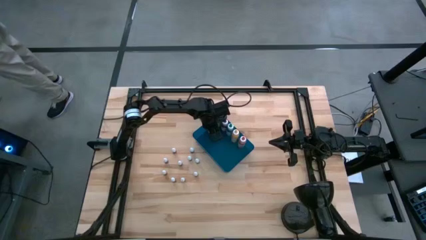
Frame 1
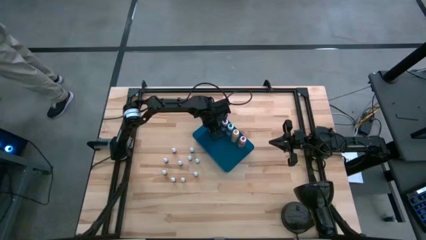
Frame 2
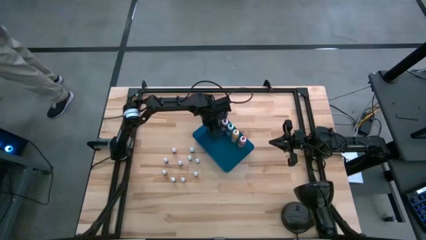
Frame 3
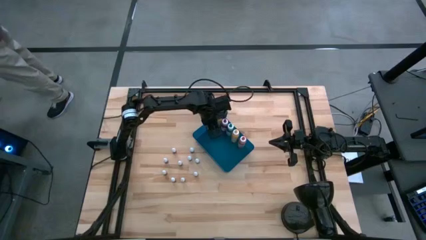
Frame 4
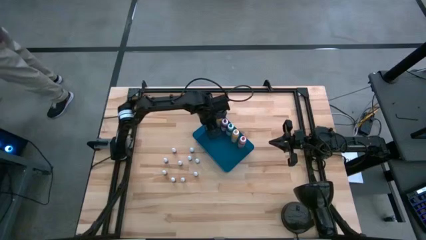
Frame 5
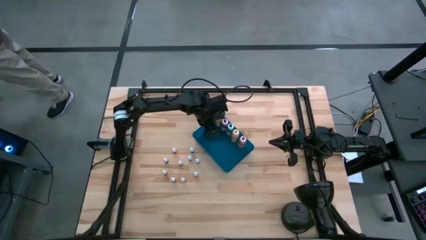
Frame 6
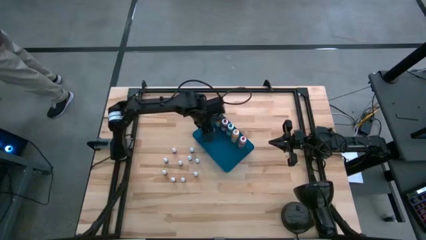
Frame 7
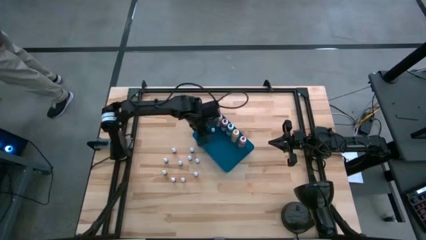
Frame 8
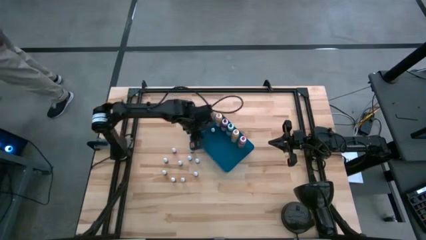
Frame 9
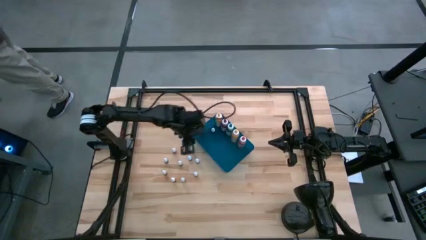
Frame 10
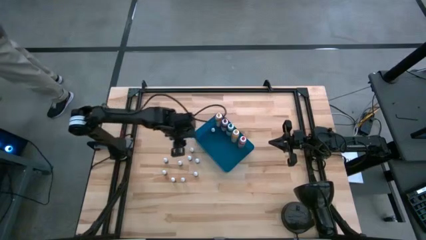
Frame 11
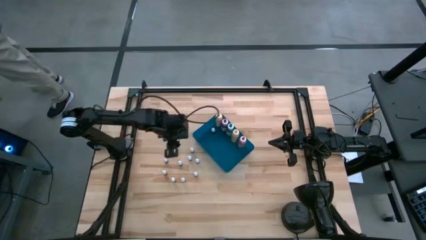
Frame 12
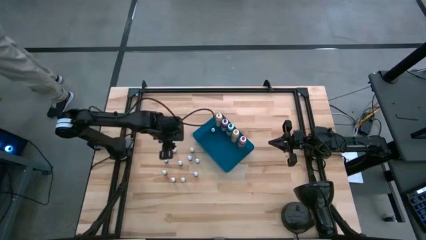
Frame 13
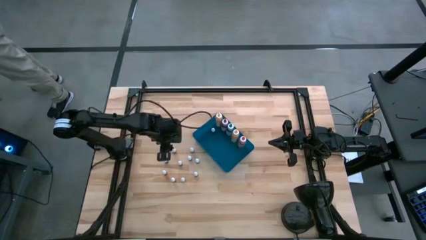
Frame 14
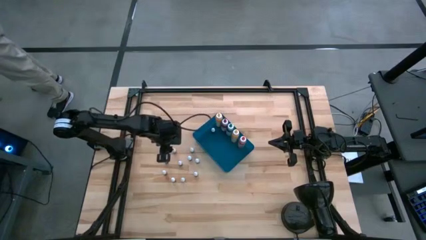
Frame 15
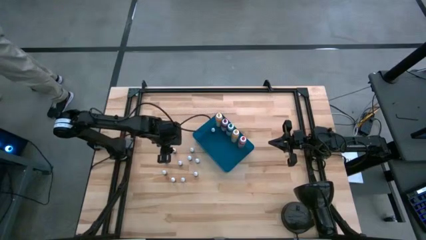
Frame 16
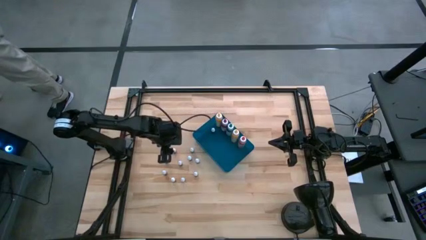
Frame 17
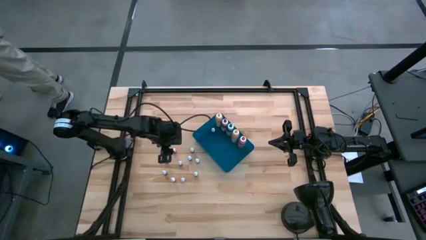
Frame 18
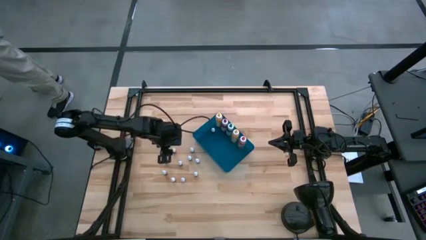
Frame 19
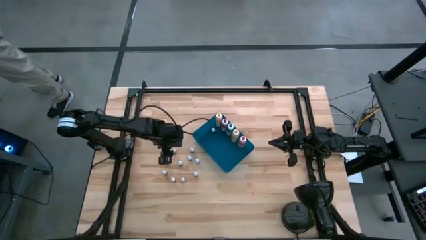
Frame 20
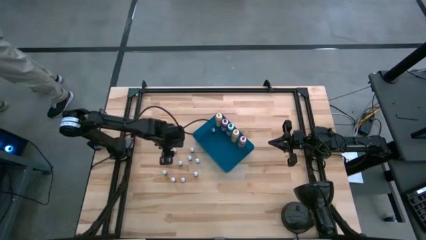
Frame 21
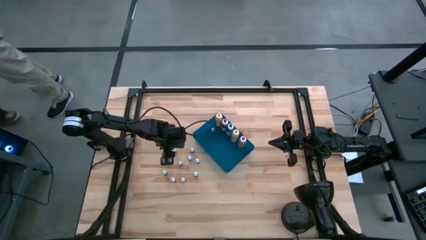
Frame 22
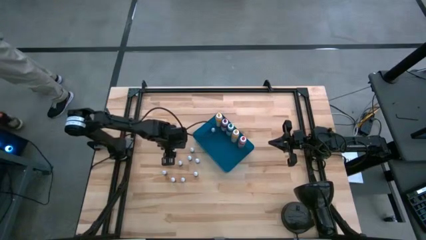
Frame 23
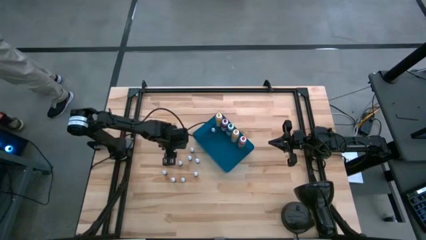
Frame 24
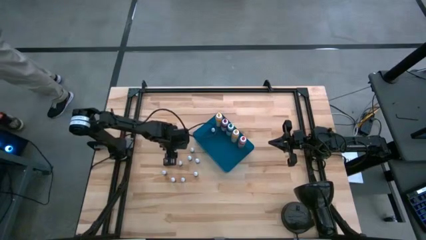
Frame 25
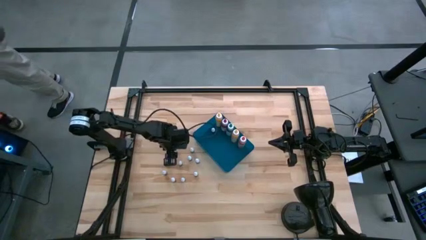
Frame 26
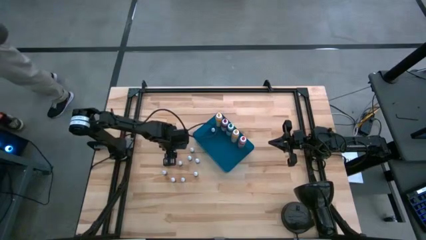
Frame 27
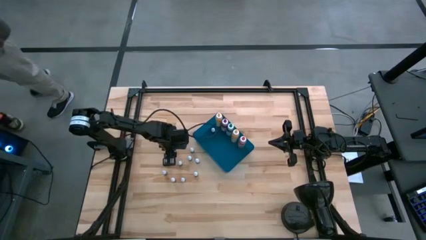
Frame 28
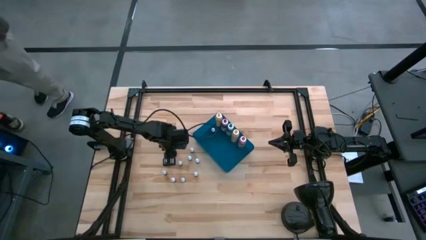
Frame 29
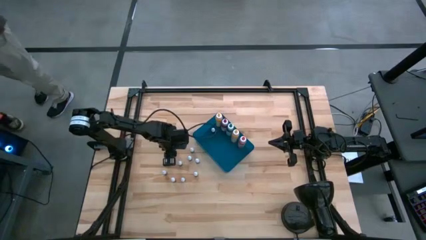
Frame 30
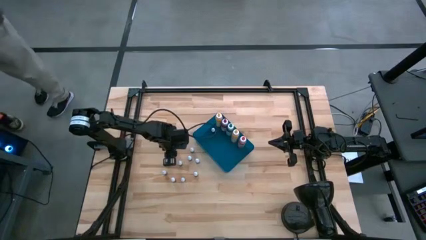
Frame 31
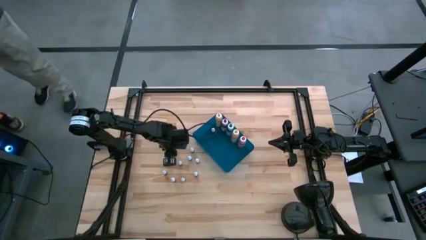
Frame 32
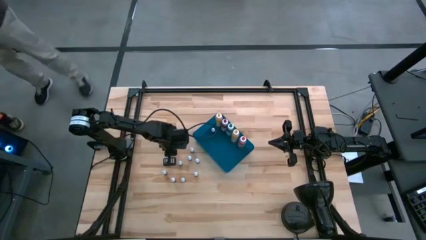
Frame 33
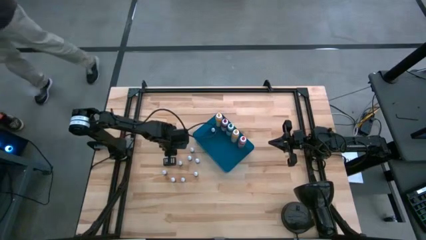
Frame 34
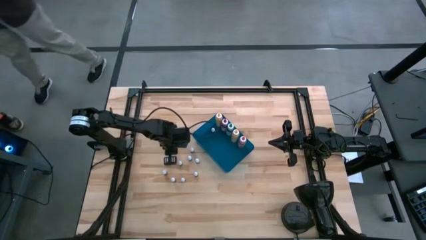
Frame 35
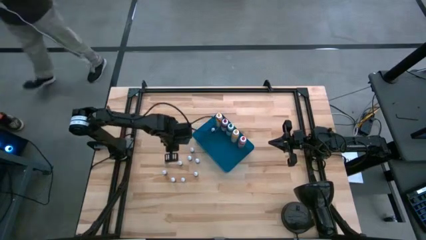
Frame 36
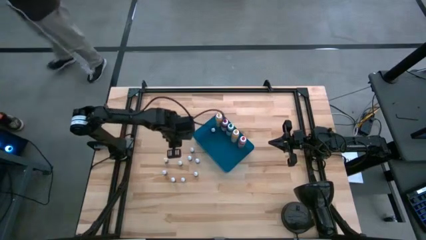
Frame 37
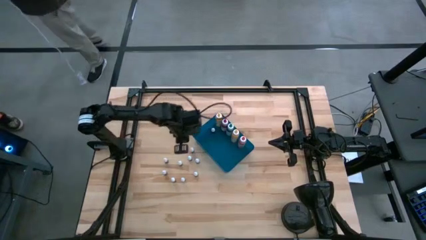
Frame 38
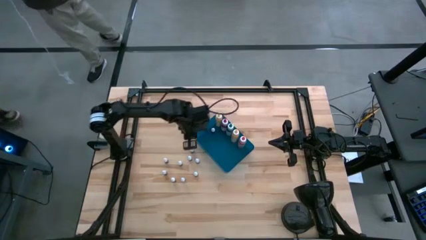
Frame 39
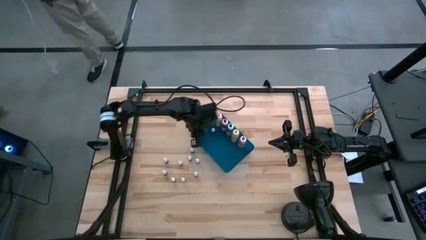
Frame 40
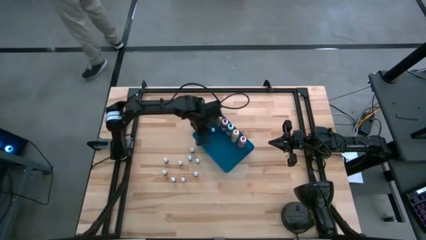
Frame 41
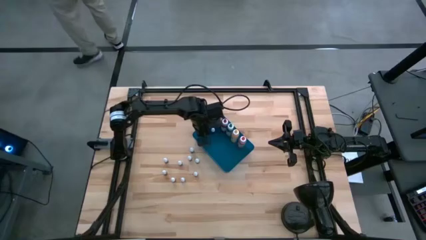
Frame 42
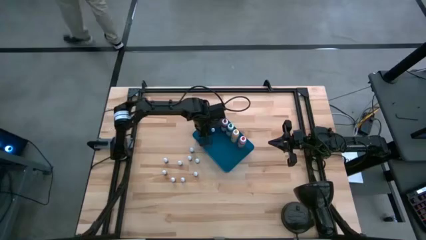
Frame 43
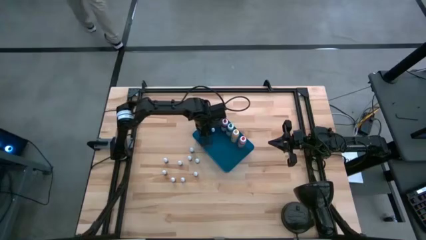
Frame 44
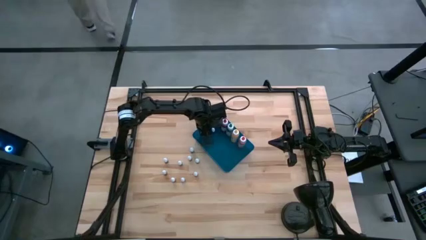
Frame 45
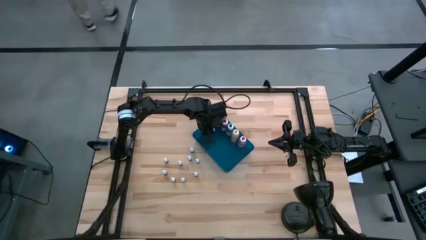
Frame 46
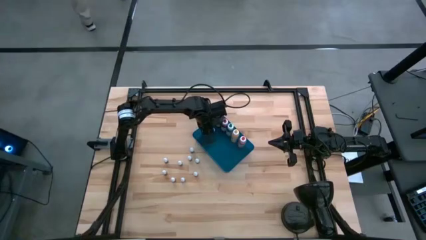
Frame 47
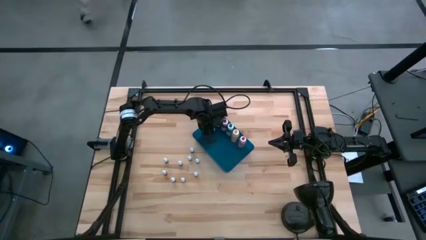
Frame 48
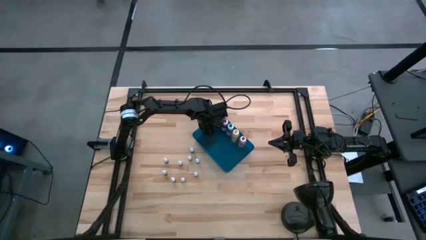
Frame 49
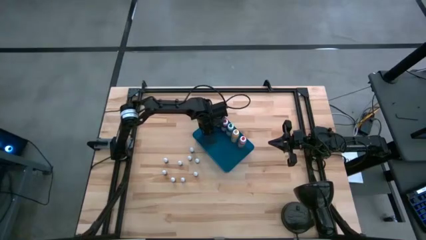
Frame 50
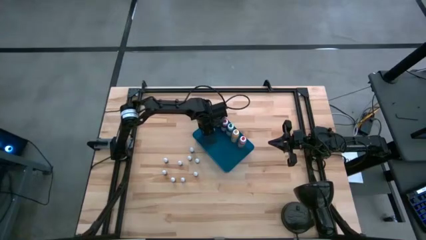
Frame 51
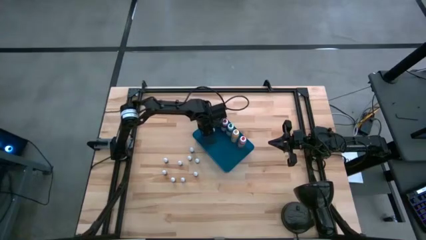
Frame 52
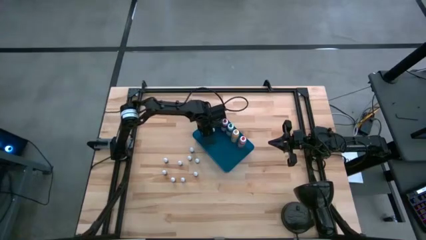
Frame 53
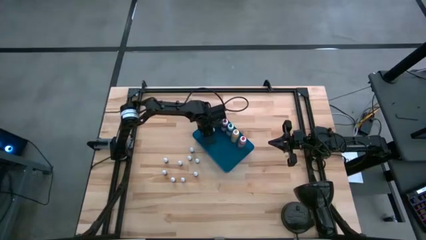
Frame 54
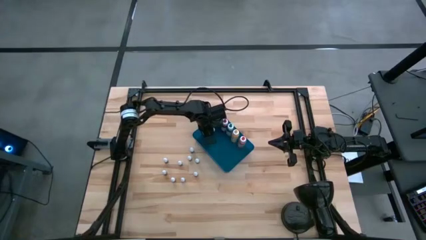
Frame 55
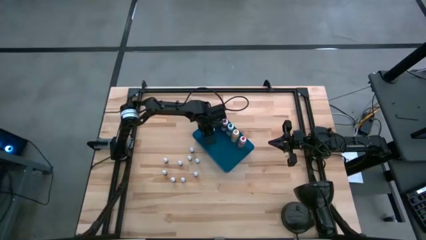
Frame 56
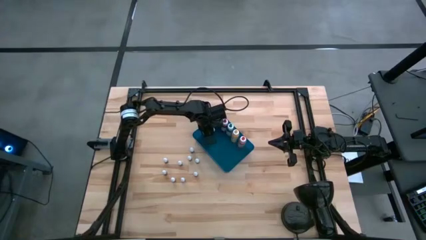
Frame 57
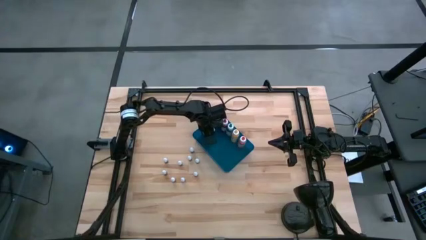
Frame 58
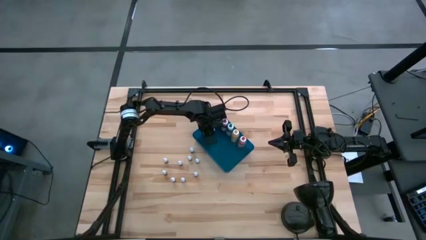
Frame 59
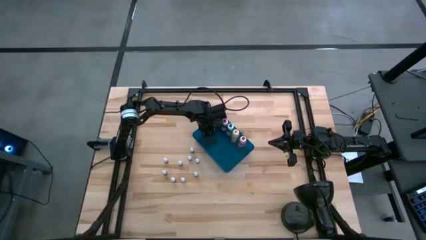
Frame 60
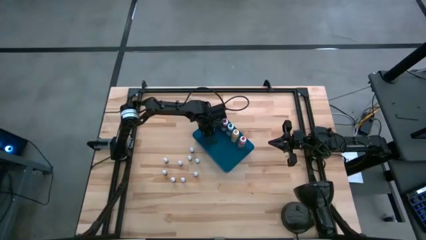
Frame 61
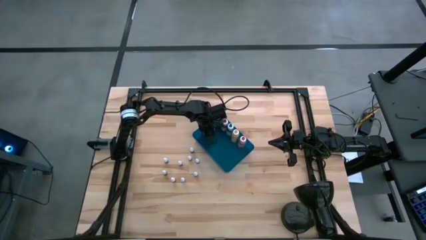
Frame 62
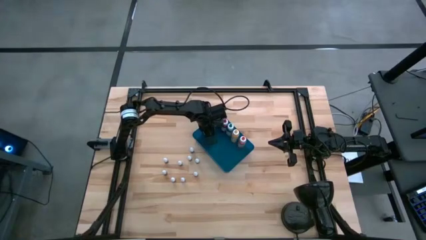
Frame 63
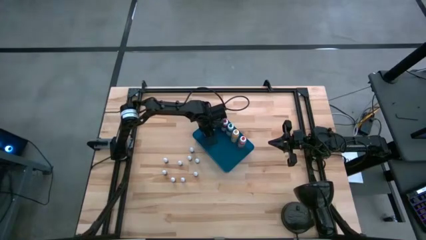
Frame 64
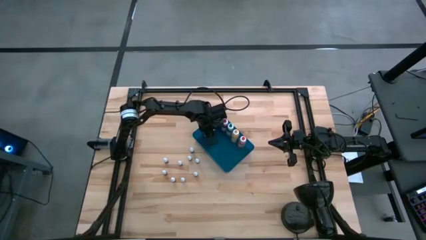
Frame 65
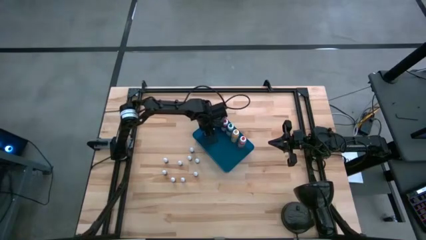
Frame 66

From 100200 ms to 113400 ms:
Task: Pick & Place food coloring
Put the red food coloring bottle into the blue bin

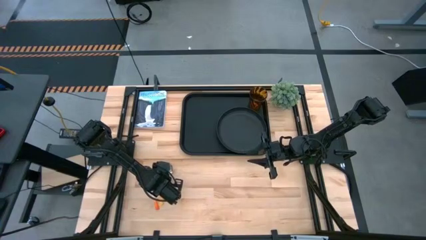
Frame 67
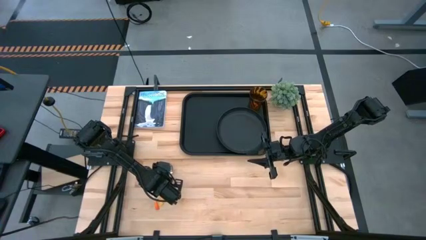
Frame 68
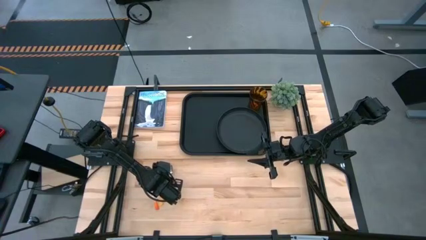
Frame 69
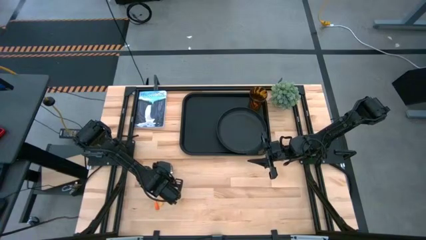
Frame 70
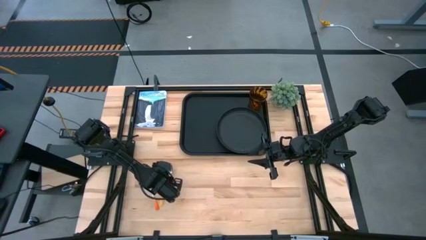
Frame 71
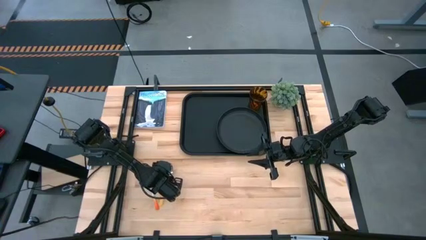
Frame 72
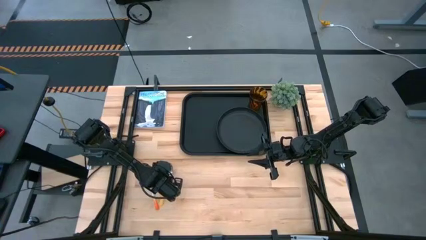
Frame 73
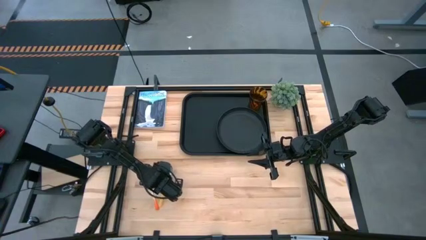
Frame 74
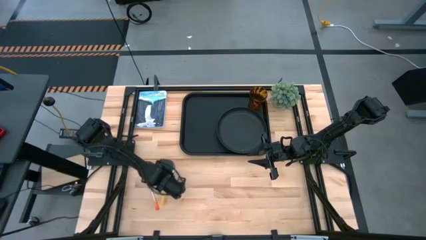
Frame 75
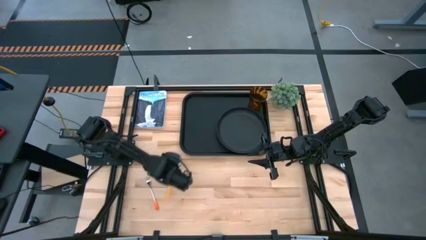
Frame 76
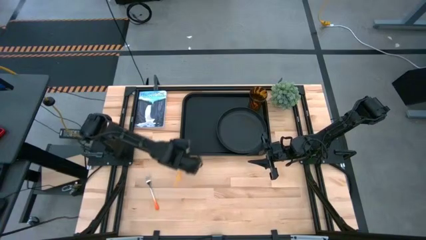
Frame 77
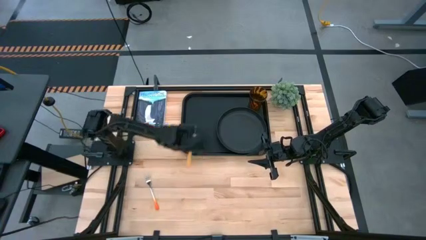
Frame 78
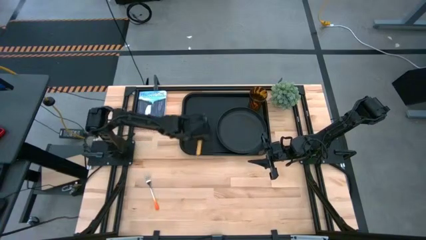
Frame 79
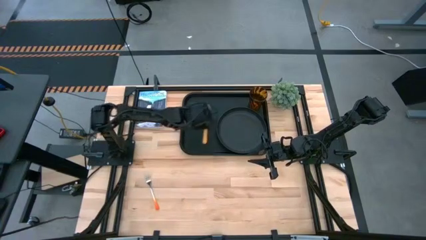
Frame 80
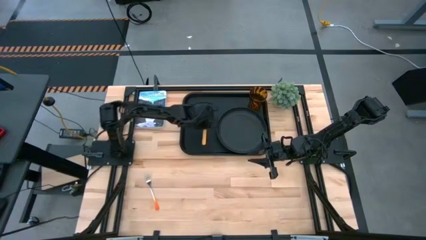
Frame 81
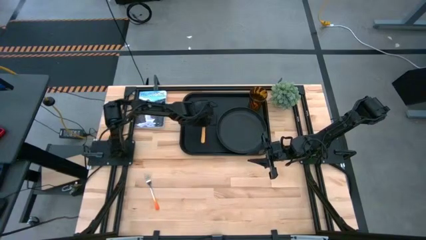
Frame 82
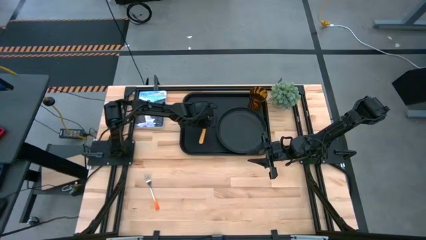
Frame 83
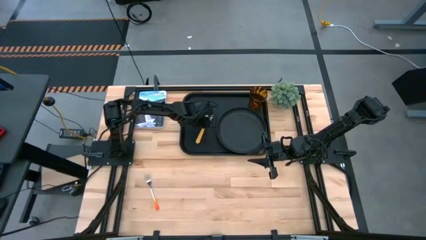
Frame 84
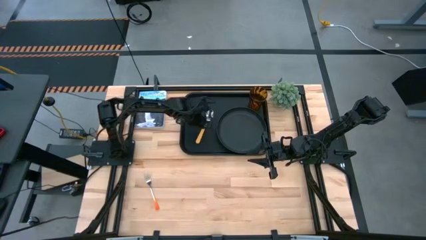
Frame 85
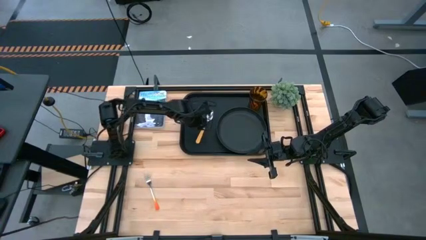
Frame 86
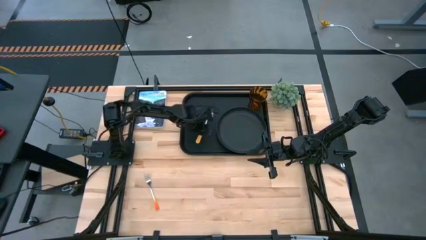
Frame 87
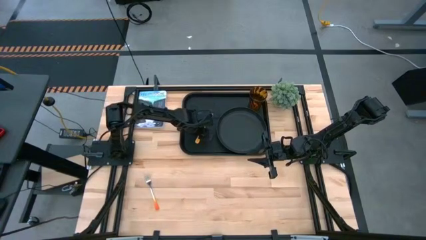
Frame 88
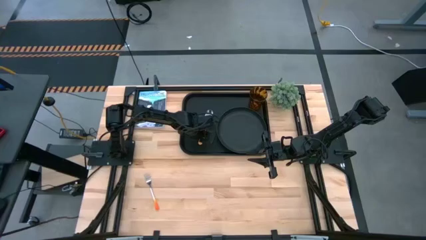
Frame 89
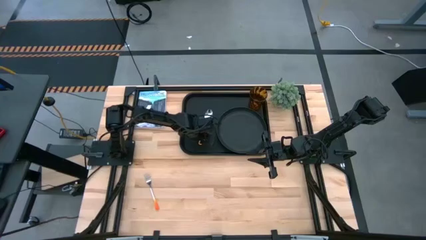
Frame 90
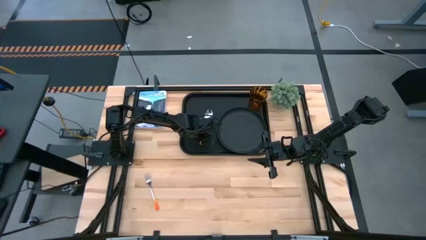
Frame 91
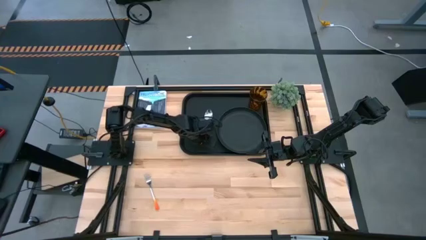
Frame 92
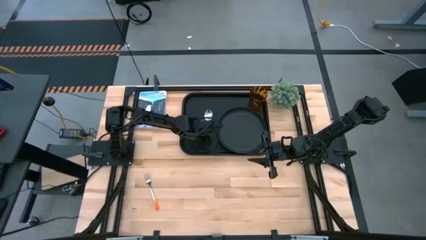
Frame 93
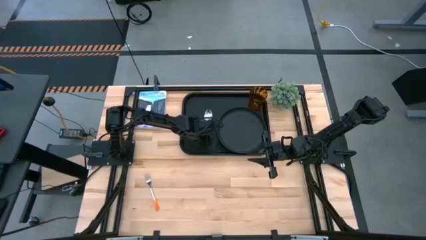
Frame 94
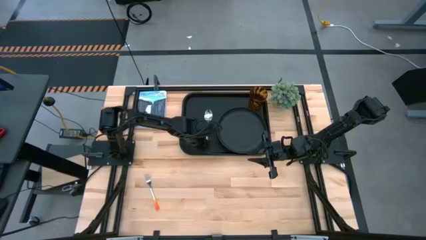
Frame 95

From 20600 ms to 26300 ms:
Task: Pick and place plate/cup/fork/spoon on tray
Put the yellow spoon on the black tray to the left of the black plate
